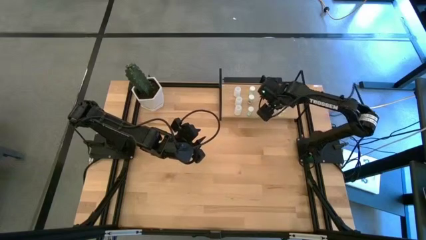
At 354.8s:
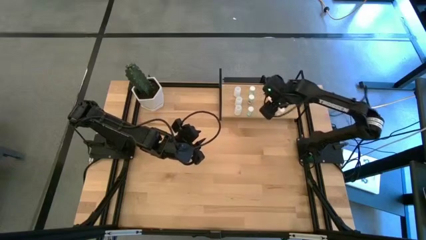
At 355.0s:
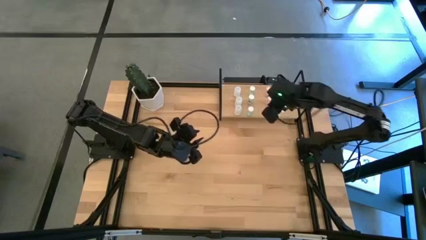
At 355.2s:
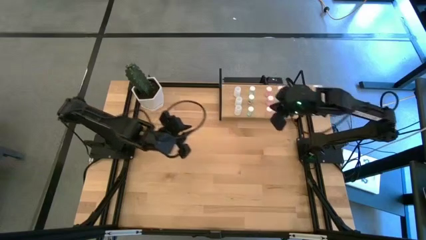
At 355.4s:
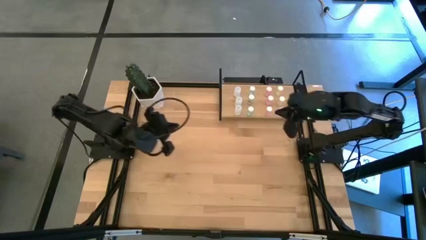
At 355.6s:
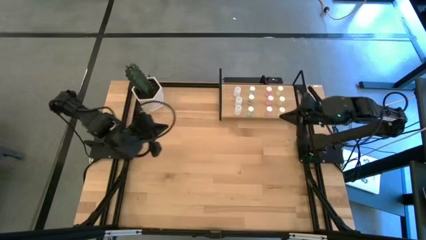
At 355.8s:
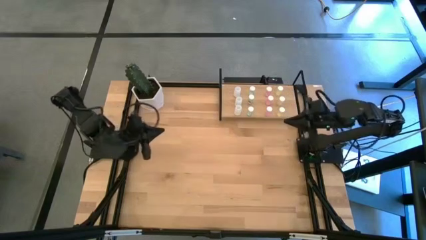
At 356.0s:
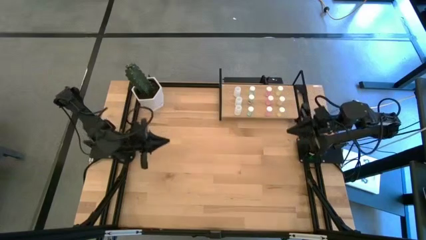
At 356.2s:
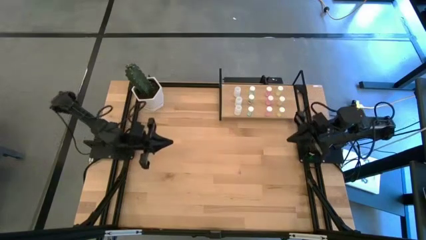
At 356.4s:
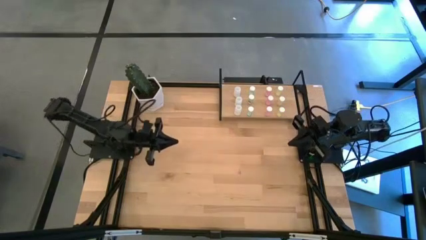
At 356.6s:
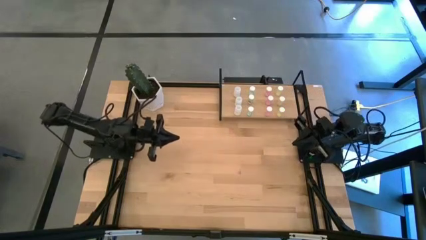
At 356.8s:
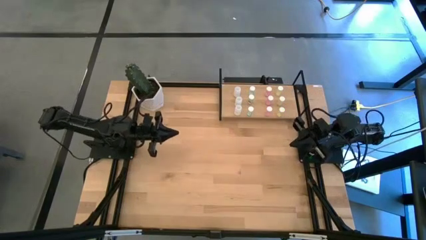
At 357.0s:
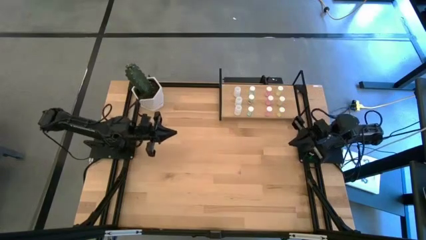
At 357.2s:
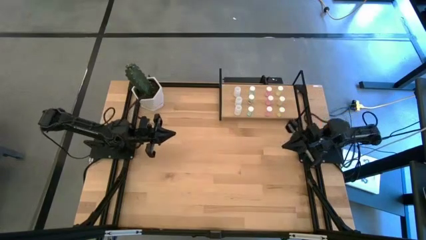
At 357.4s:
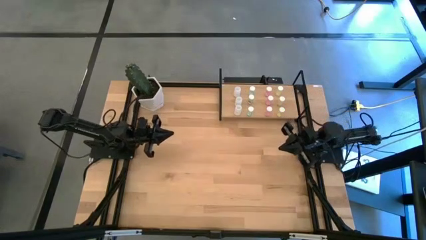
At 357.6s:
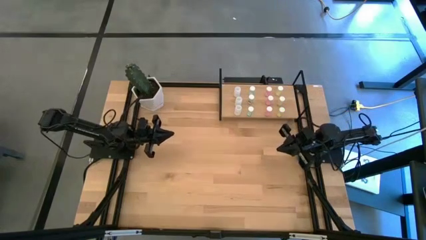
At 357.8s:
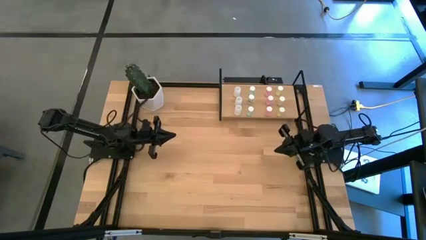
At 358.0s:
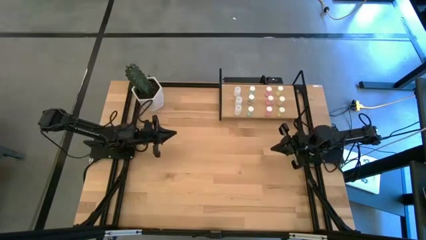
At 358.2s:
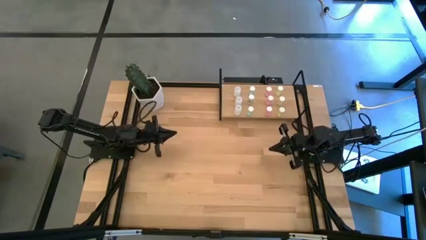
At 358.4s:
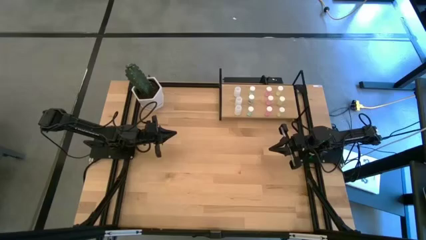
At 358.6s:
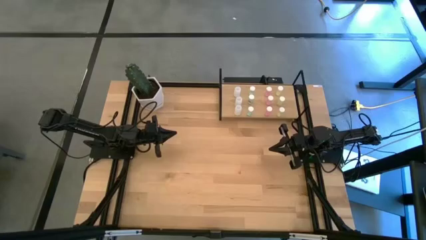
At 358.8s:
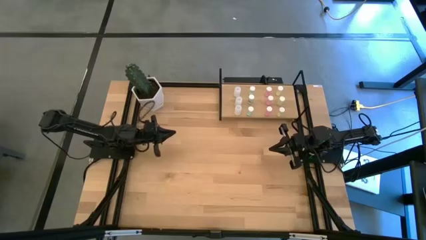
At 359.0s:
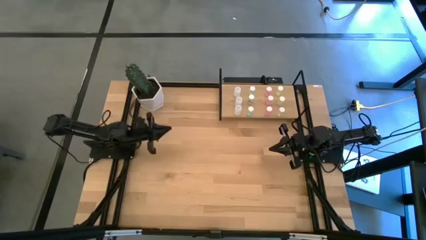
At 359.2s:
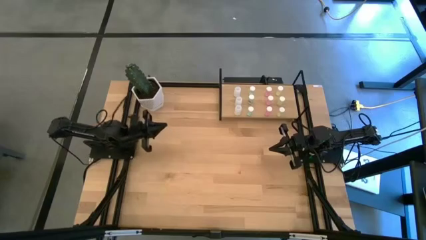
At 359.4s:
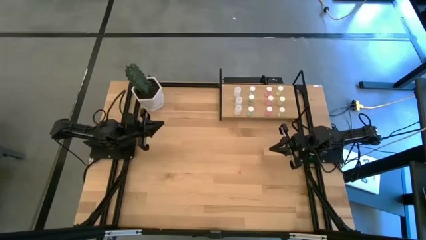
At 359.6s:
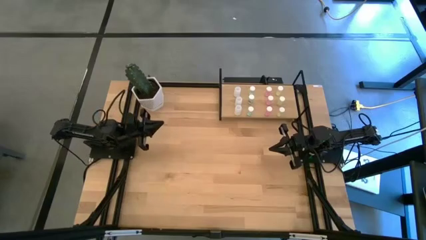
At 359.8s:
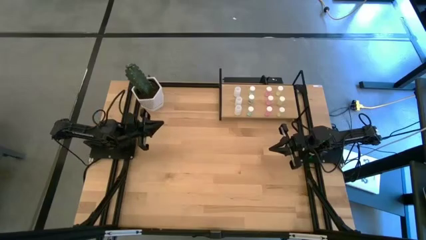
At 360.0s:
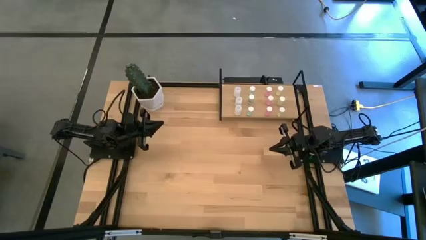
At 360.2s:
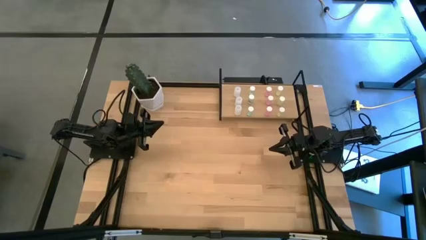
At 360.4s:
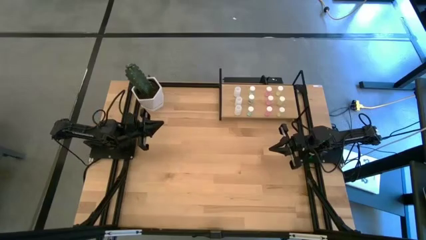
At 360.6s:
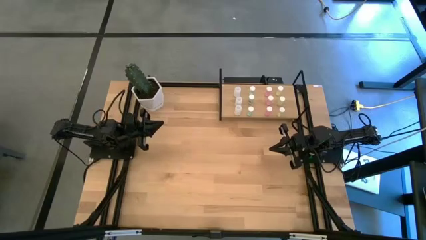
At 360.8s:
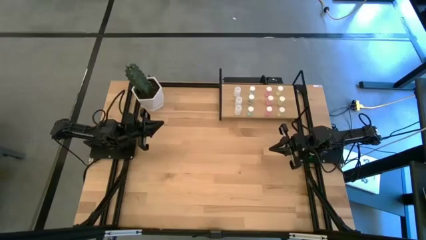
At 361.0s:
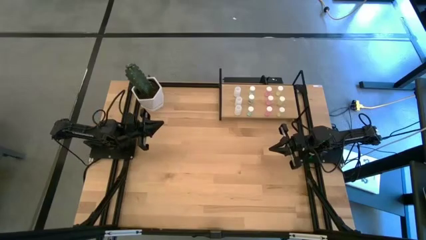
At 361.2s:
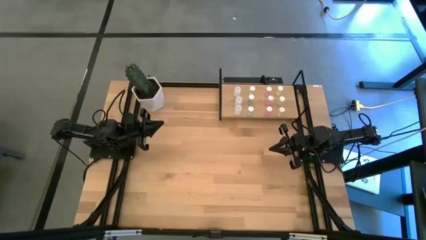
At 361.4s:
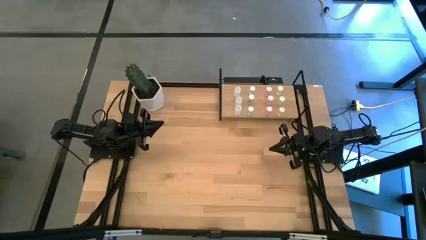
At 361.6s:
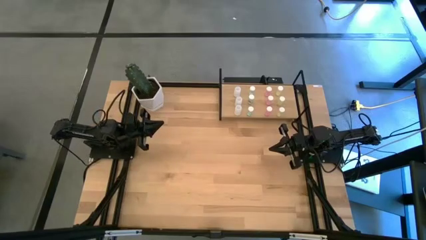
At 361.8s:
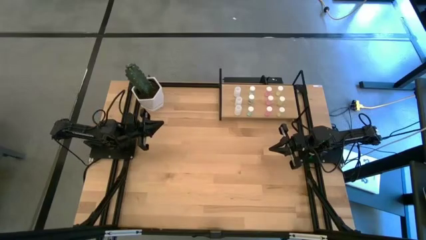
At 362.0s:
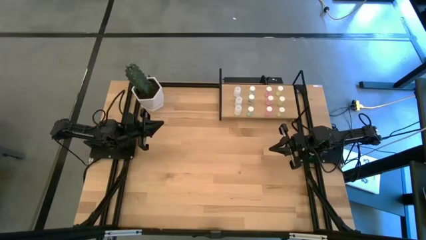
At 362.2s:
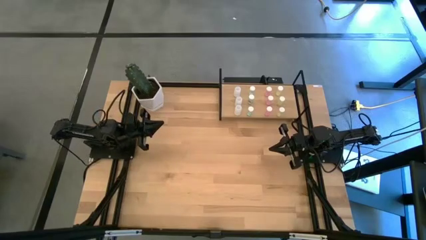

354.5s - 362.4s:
Task: Pick and place medicine bottles onto shelf by color
Return to Home Position

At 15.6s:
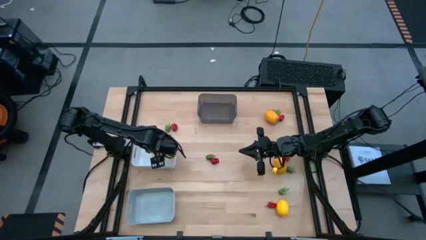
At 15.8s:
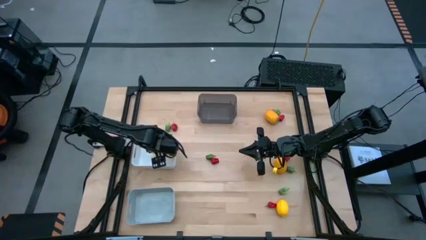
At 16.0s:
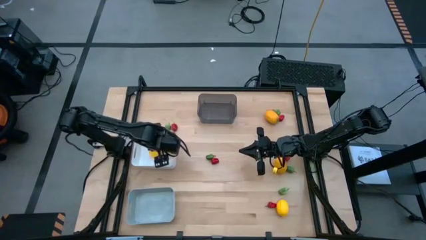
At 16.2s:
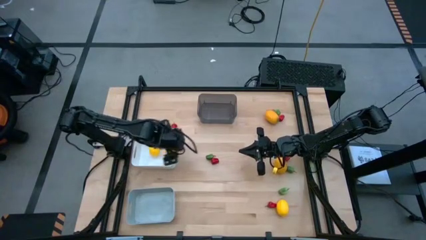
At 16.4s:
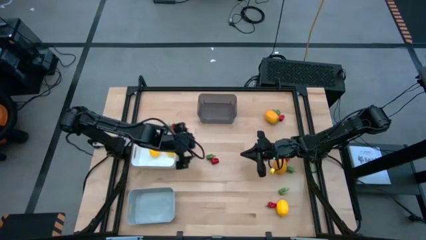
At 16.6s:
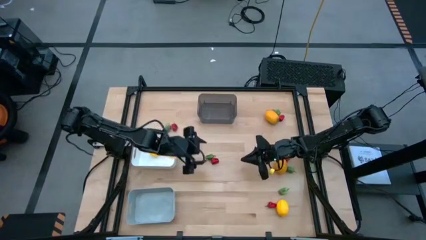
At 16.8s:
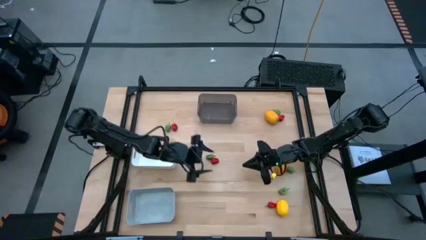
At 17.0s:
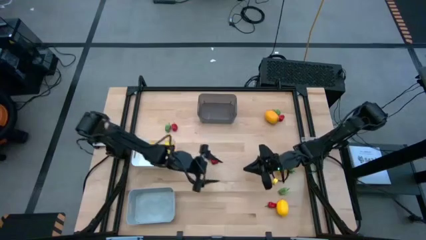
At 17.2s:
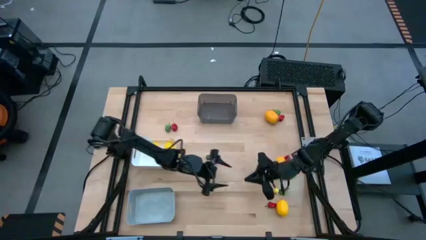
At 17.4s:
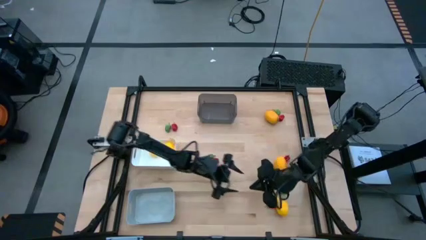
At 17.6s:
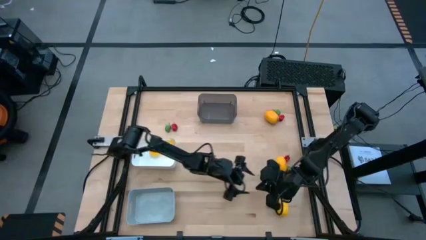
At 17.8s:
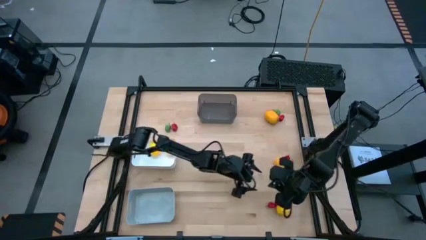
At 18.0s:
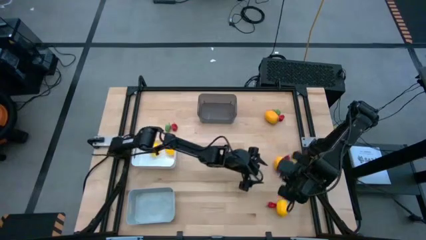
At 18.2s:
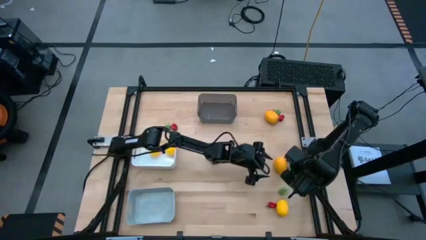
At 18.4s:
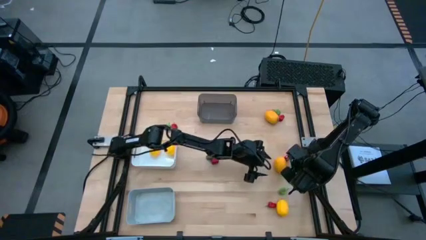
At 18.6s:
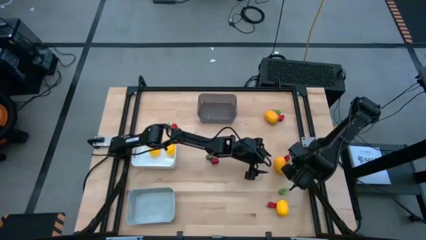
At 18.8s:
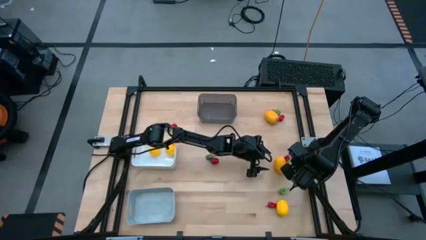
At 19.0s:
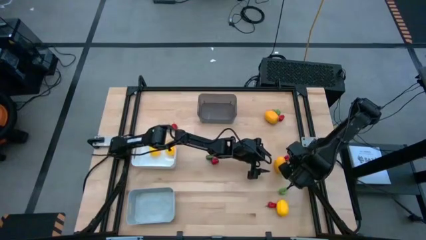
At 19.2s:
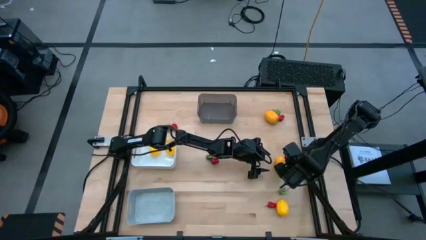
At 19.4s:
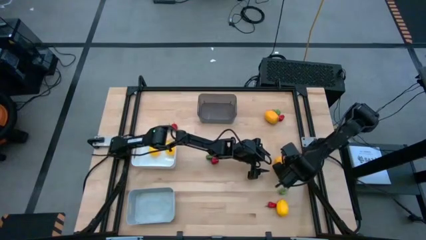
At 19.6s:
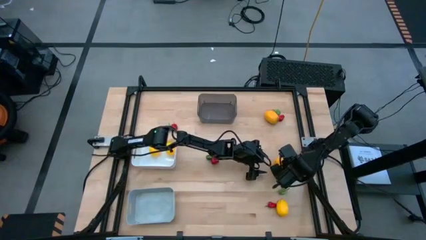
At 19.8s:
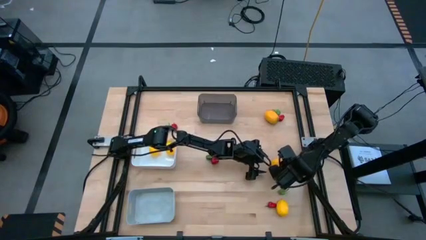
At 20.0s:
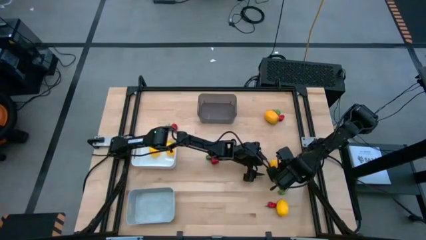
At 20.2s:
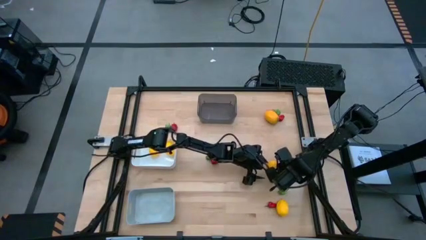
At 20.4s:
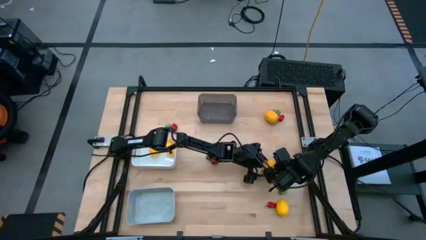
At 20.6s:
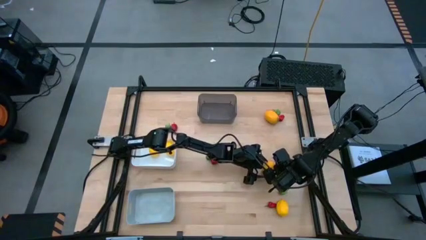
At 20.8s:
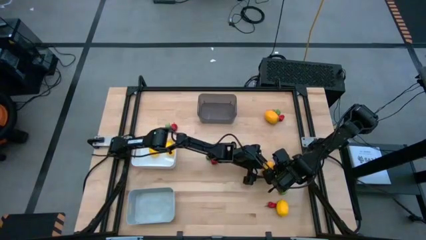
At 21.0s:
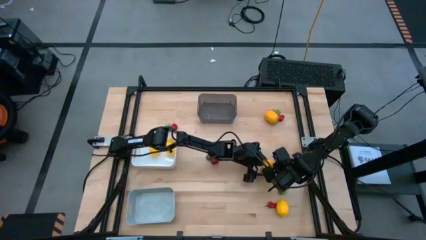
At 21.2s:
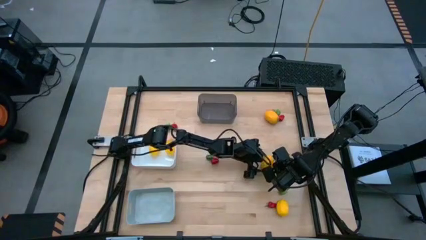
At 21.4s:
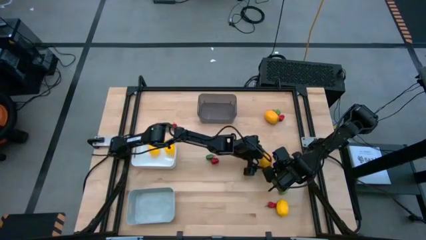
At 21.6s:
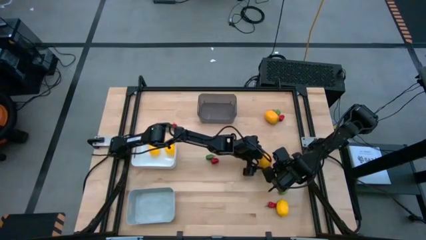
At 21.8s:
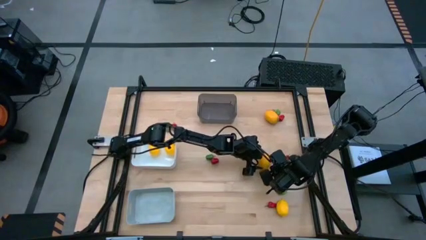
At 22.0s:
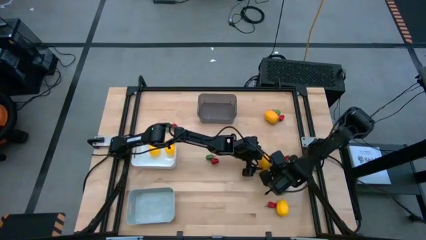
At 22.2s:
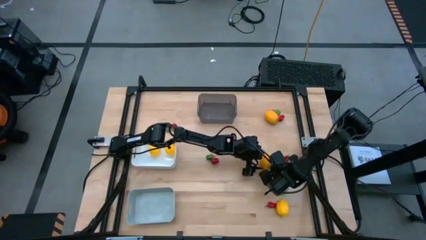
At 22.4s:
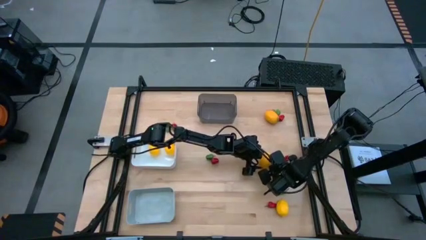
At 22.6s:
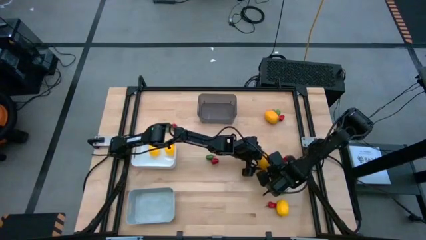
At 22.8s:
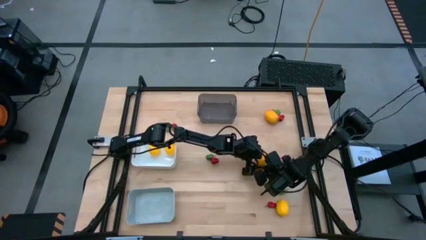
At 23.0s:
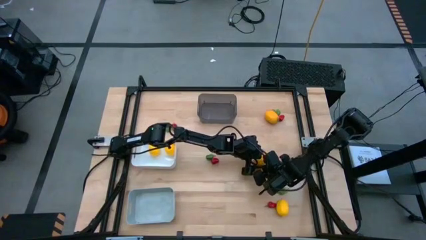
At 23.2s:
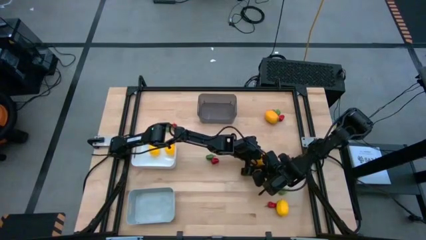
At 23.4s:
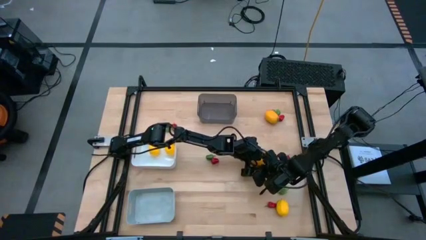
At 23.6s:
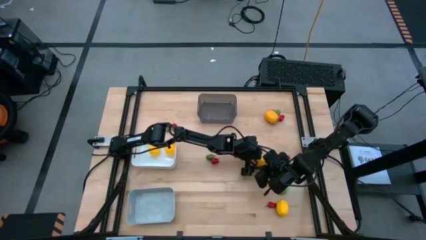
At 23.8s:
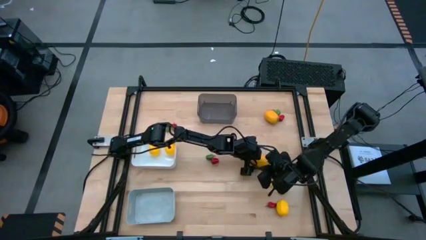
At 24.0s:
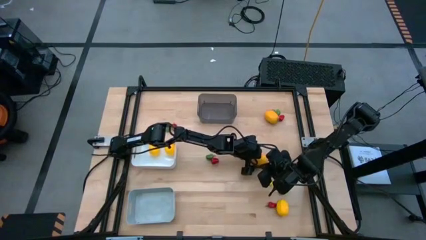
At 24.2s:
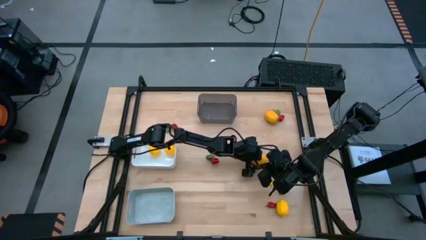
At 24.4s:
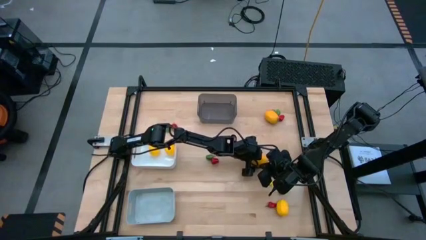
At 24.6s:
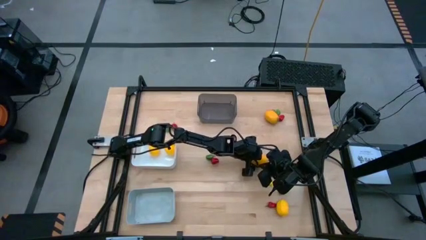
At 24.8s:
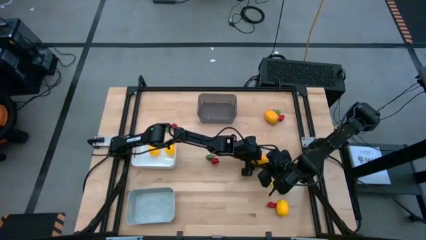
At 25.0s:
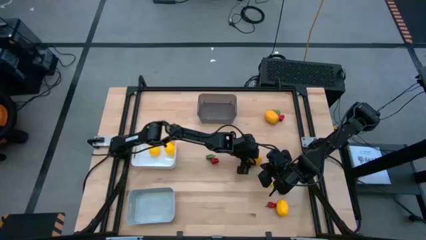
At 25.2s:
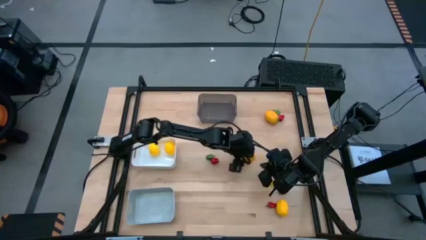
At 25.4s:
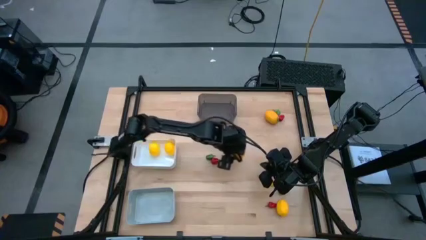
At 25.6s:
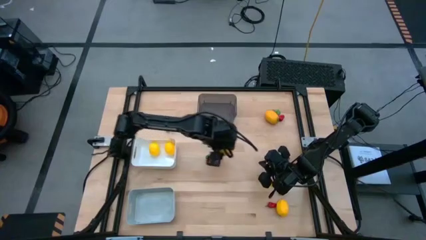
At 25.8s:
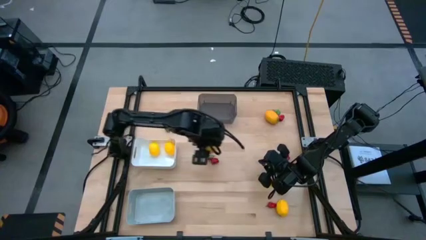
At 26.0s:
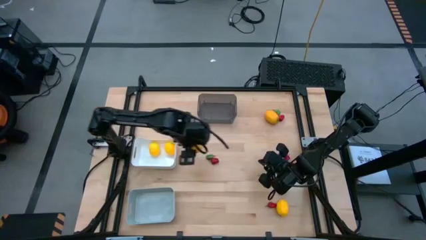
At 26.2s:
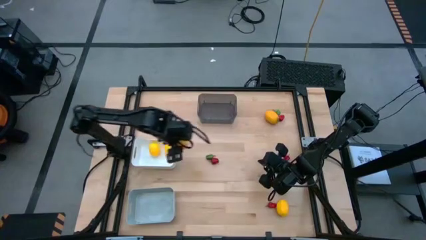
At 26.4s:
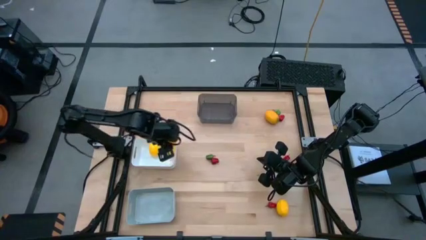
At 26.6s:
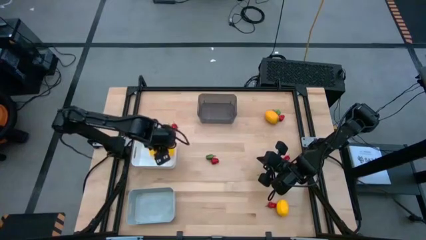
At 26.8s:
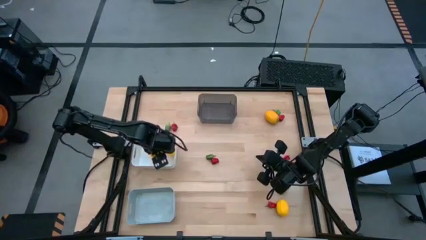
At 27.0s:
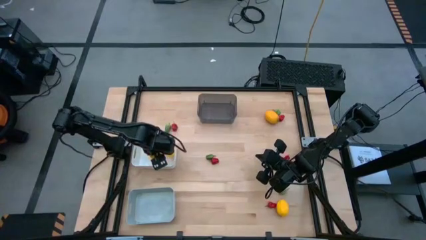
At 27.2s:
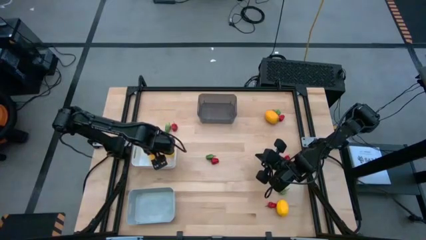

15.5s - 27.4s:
Task: Sort produce into baskets
Put the lemon into the white bin
